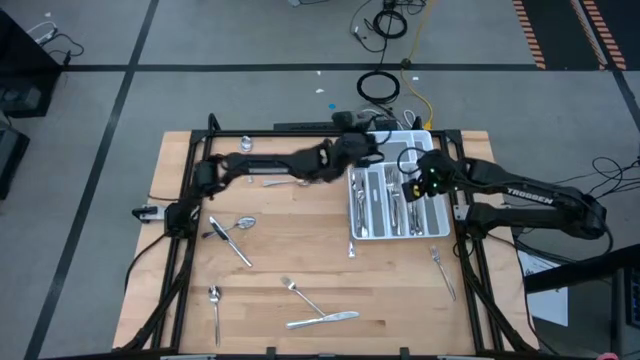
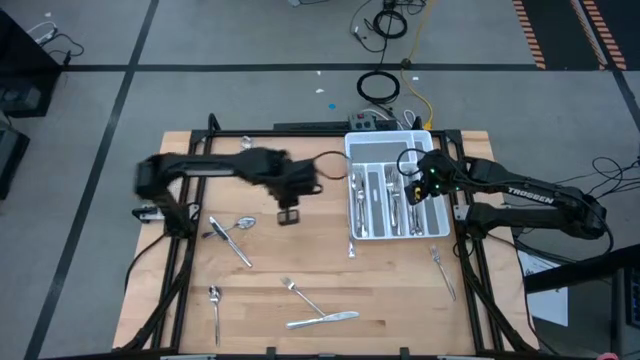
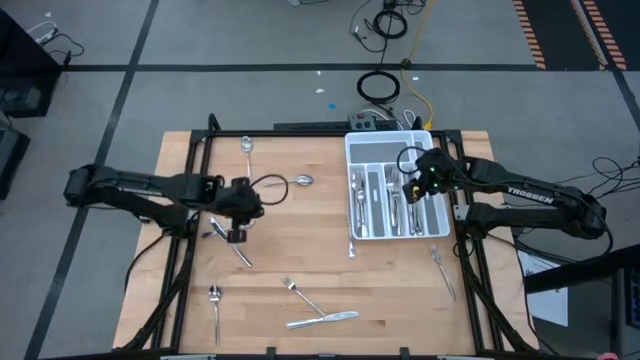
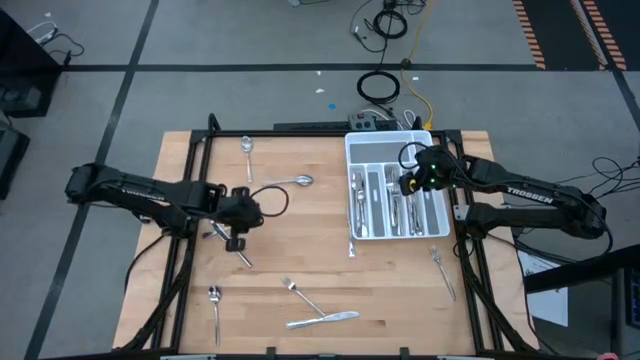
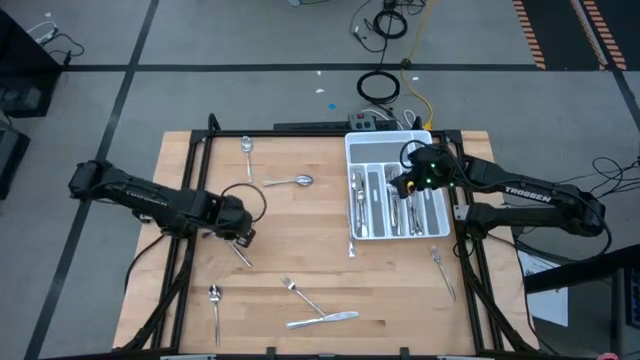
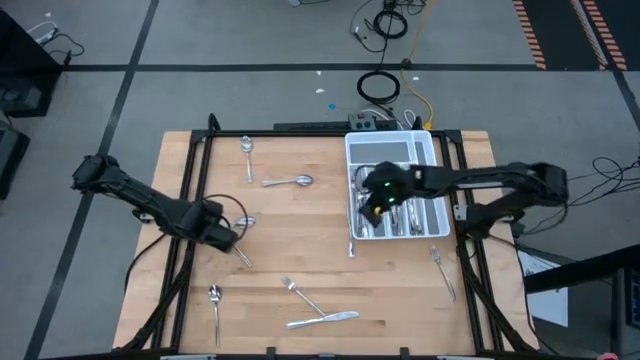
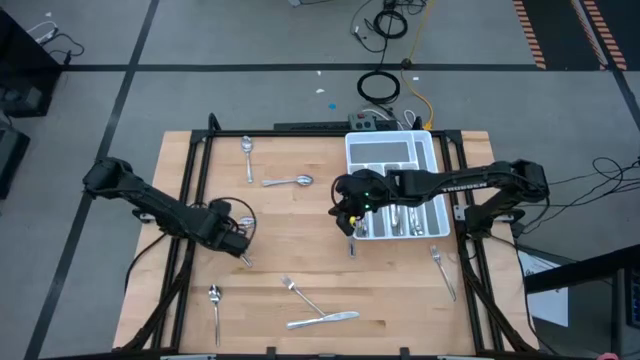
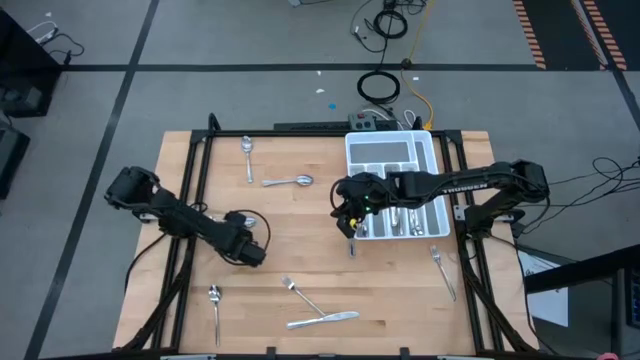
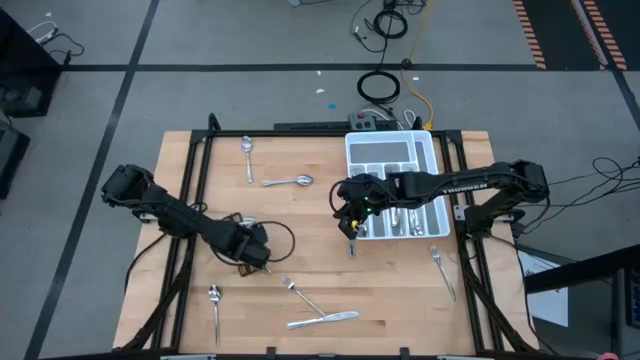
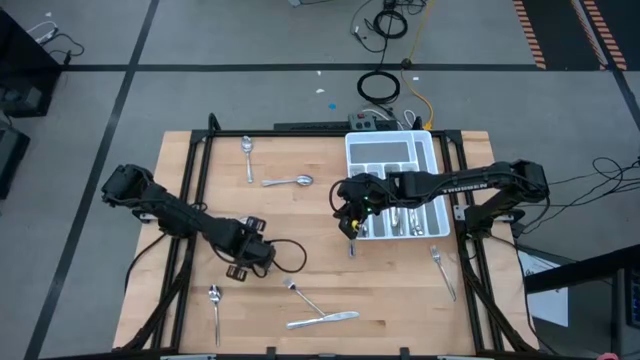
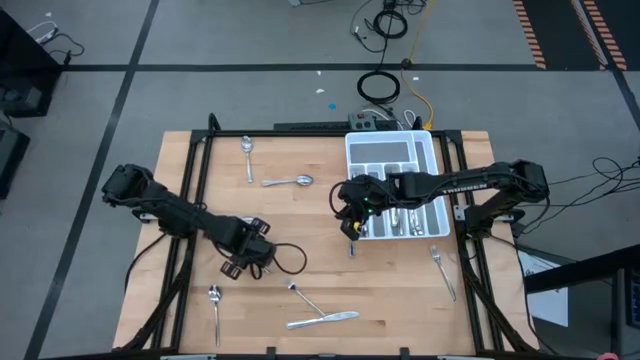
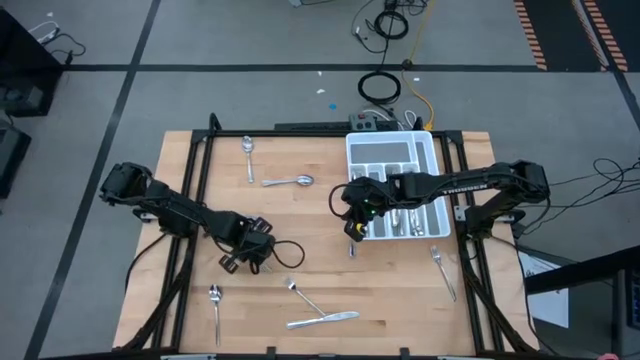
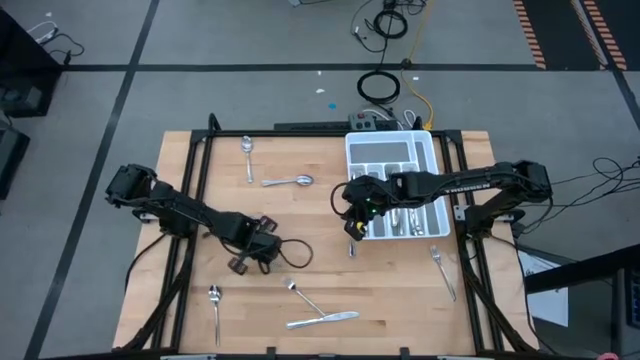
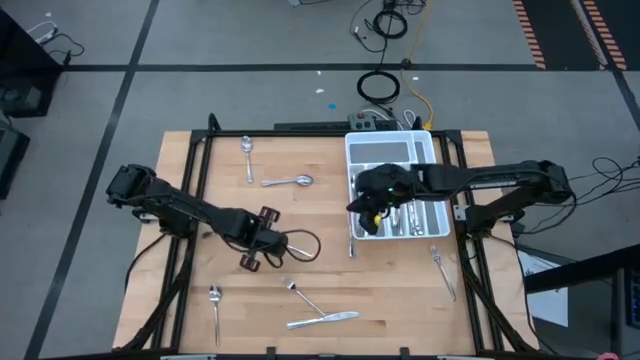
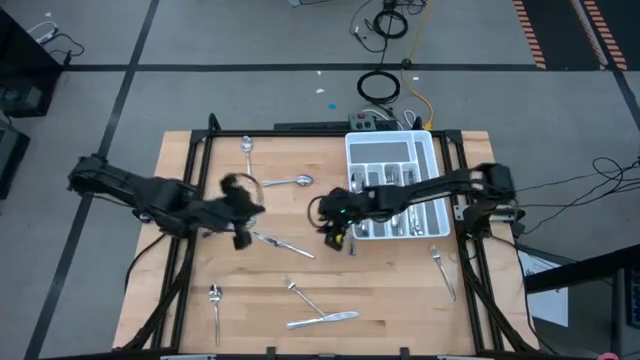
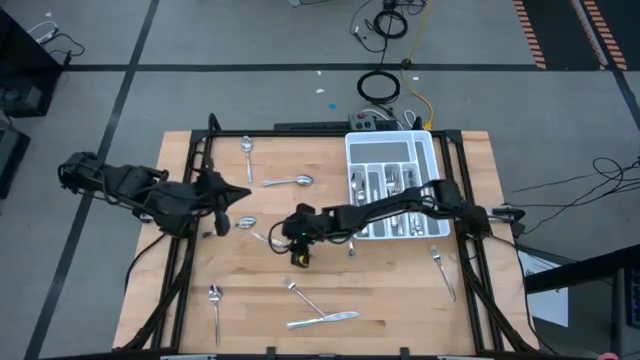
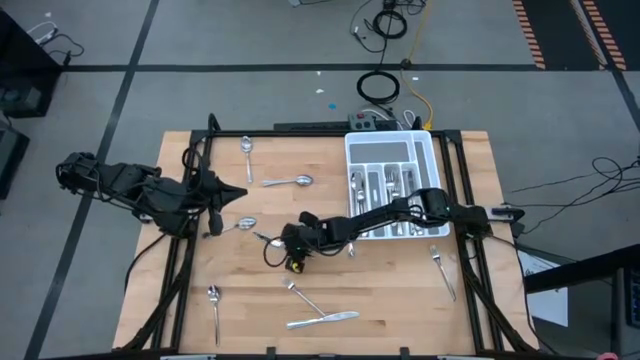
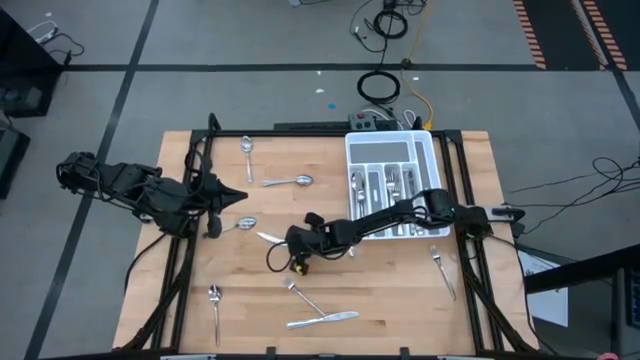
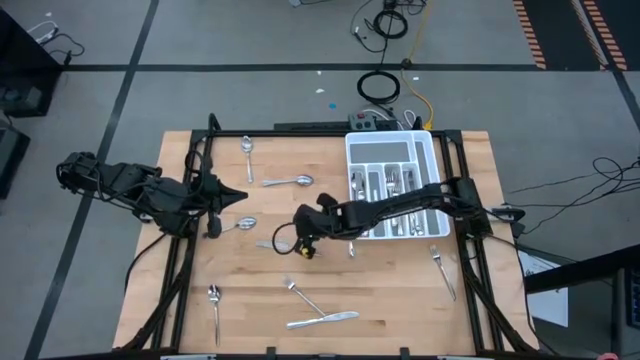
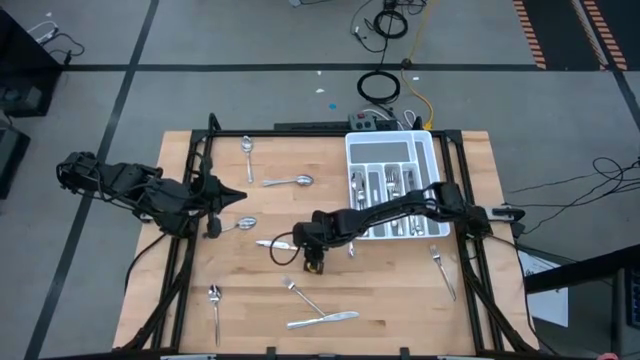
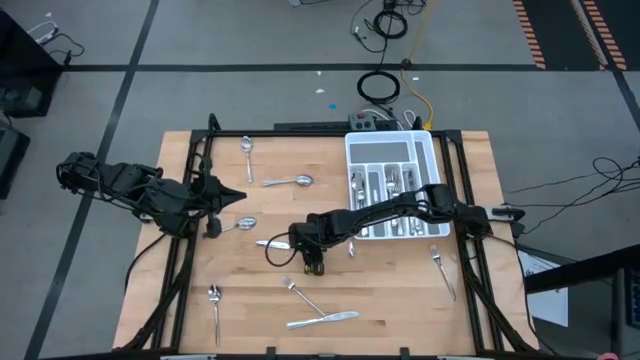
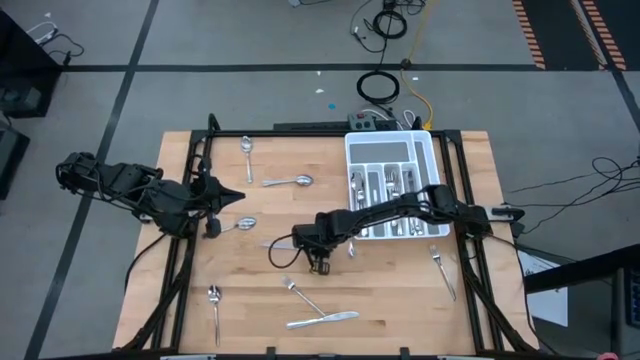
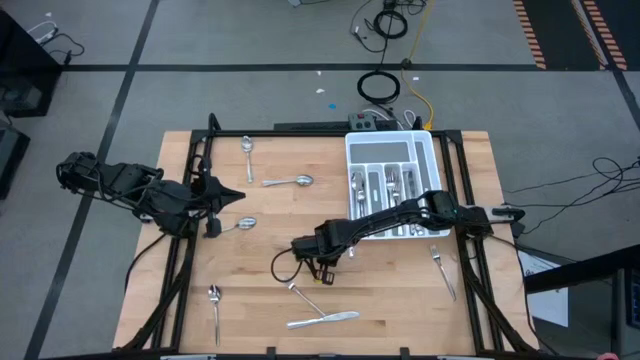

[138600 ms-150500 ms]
Task: Sort silverware
Put the silver knife into the white silverware tray

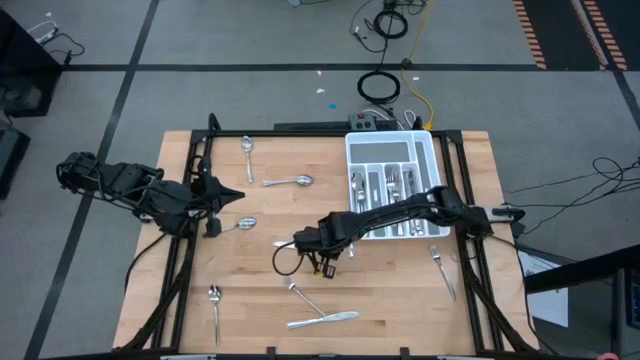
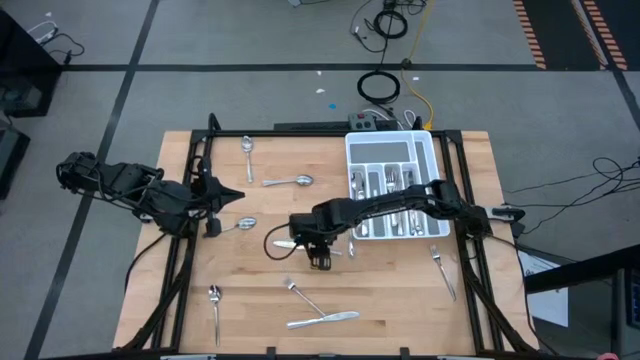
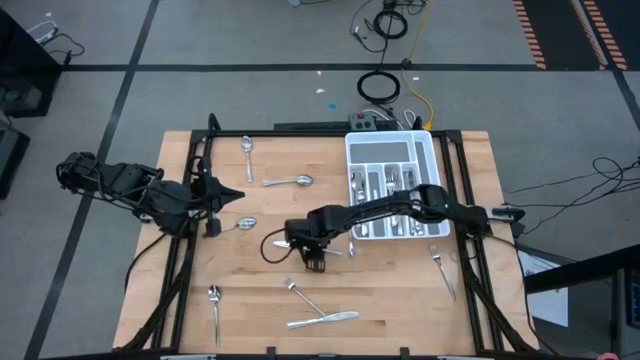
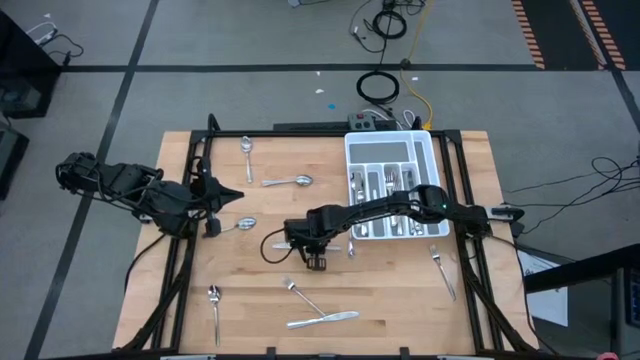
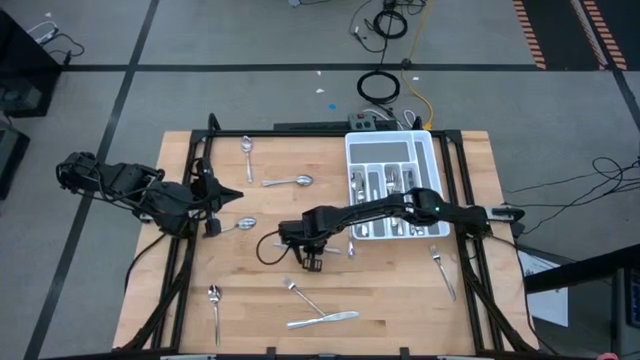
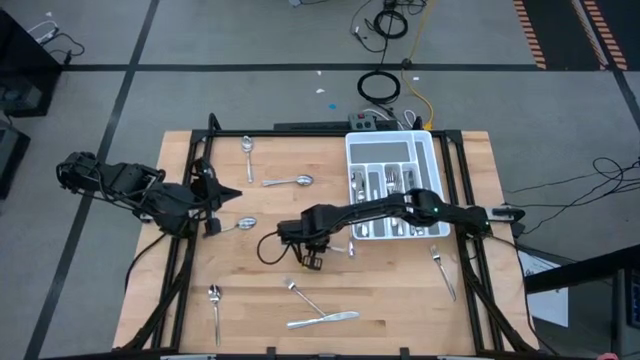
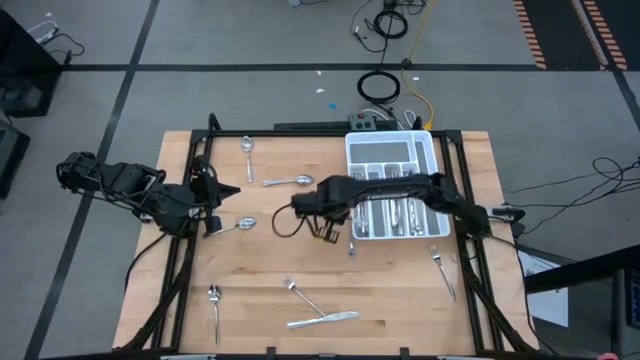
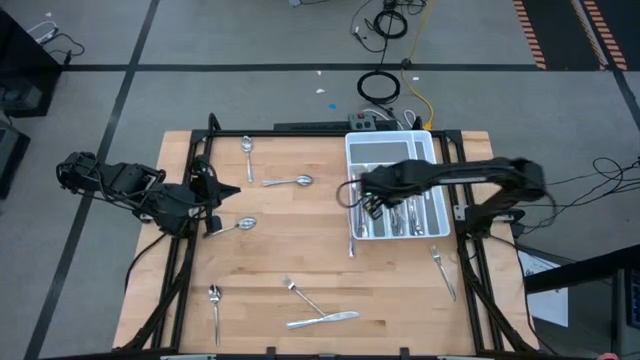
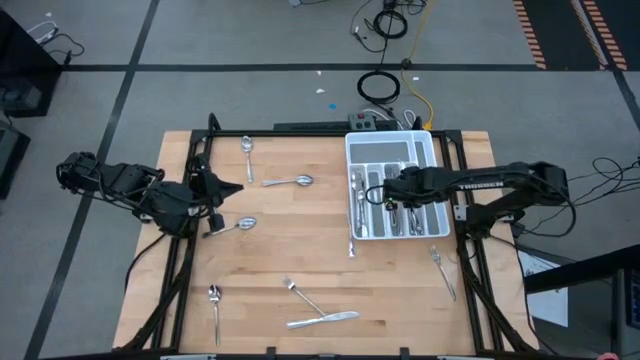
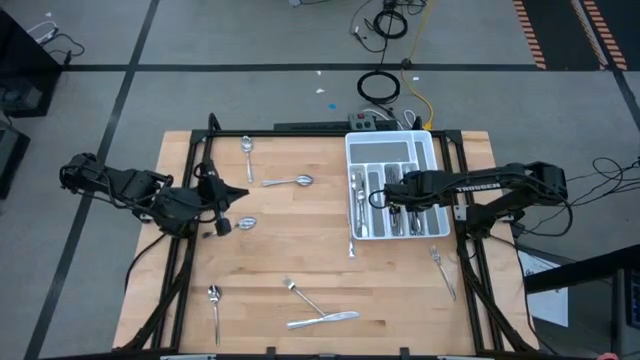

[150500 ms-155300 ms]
Put the silver knife into the white silverware tray

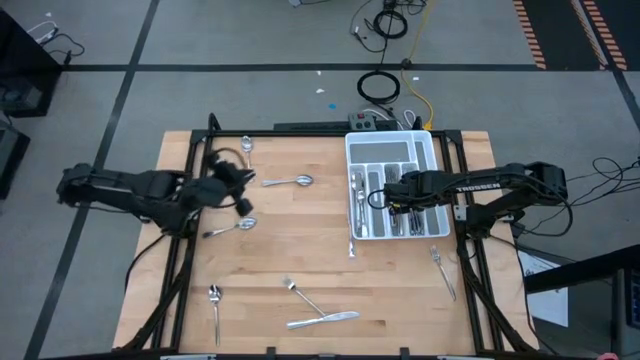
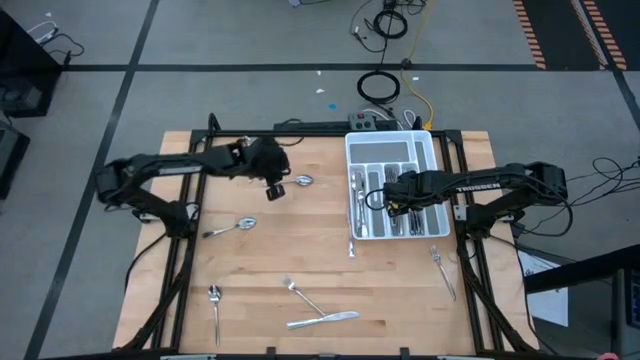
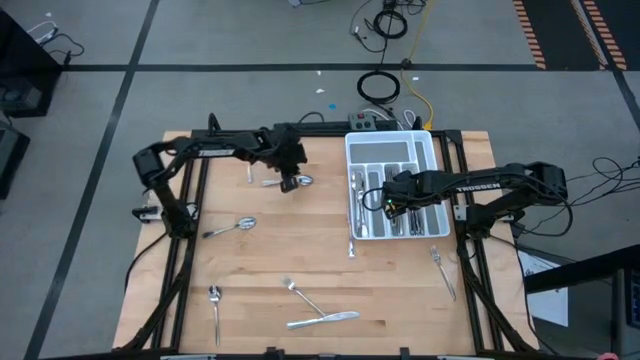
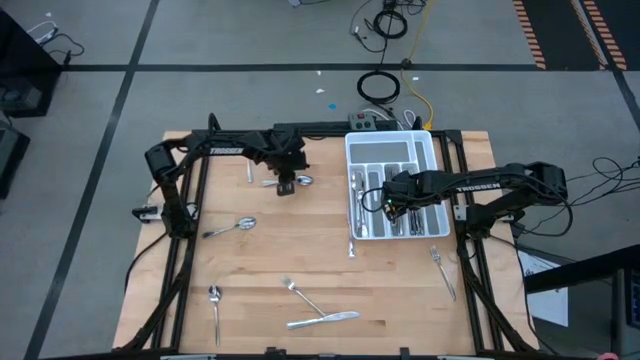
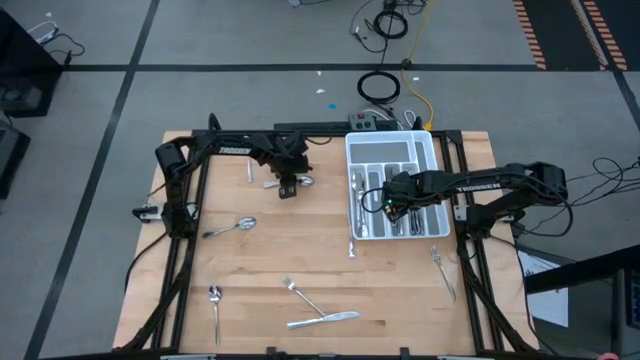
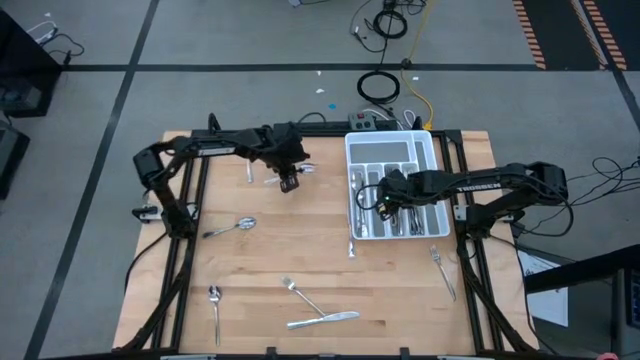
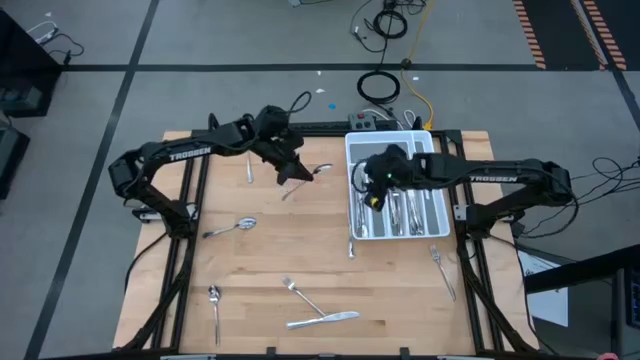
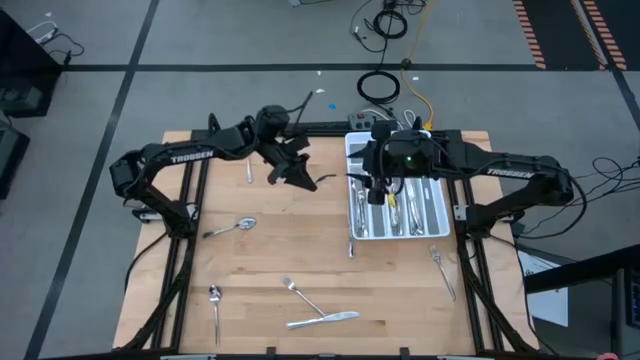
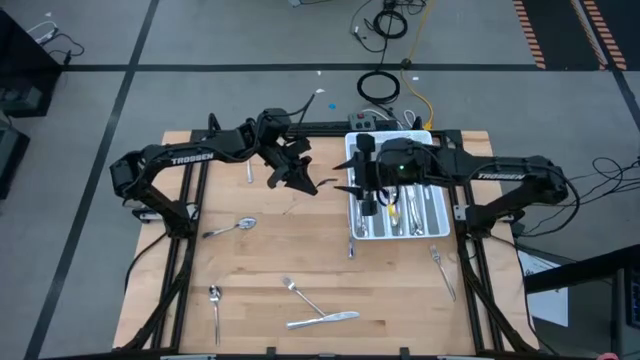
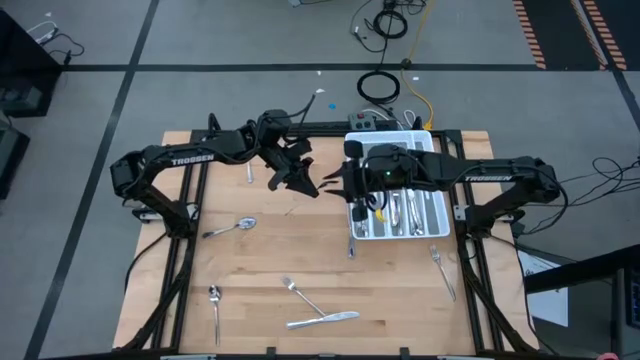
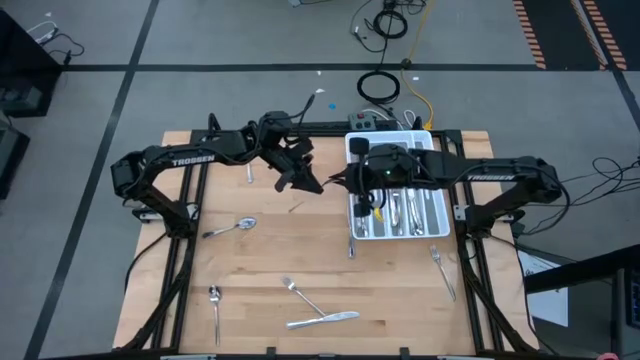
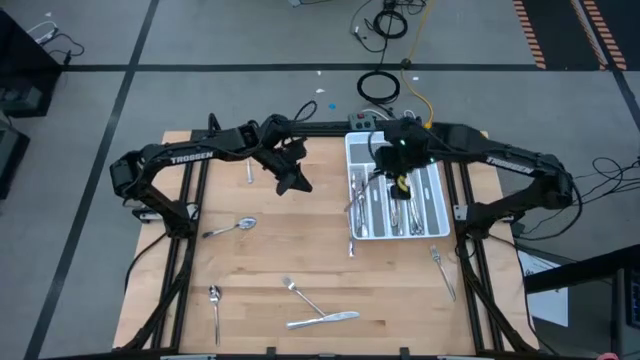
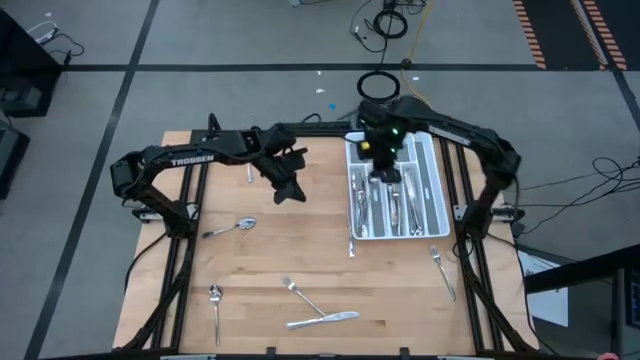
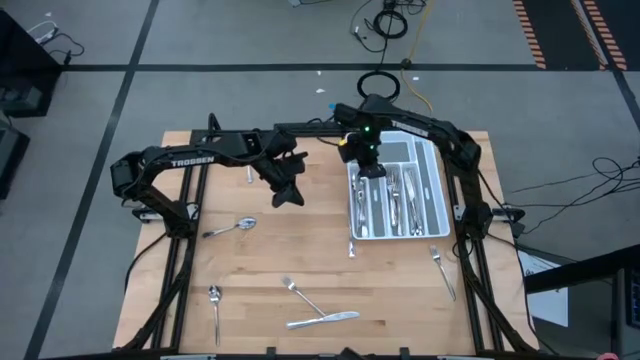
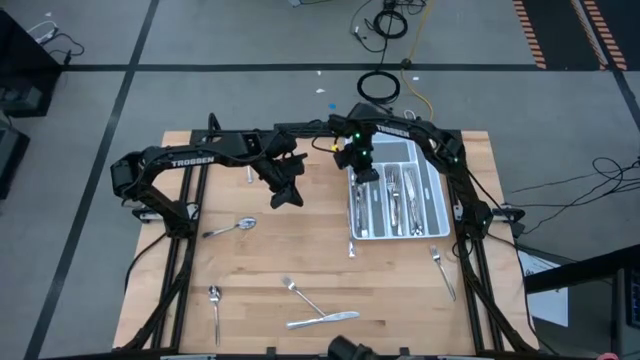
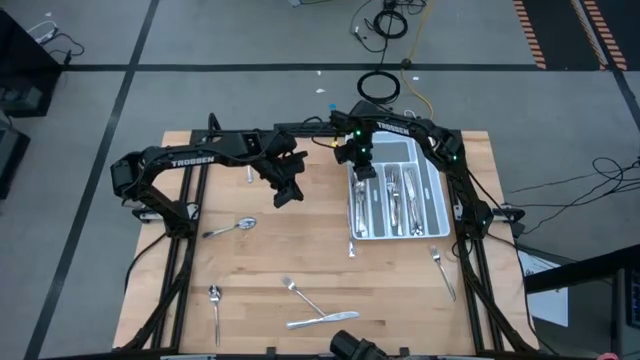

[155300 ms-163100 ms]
Put the silver spoon into the white silverware tray
